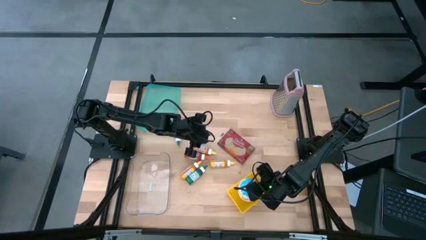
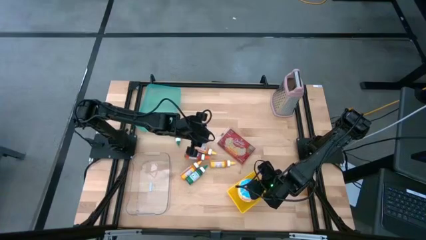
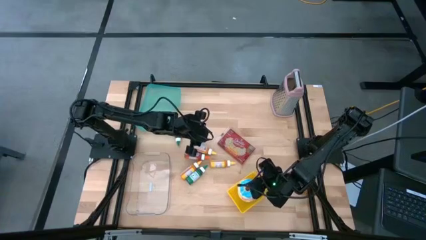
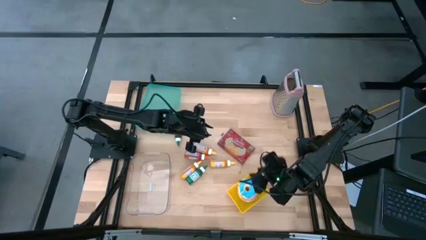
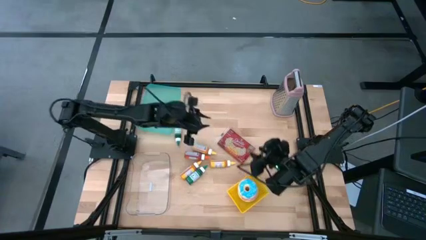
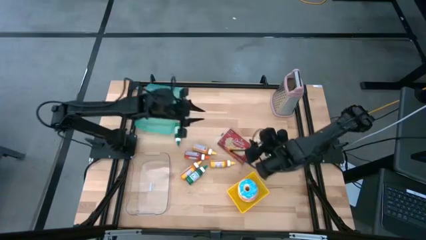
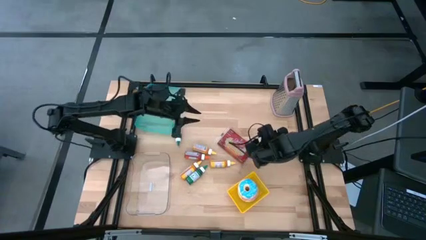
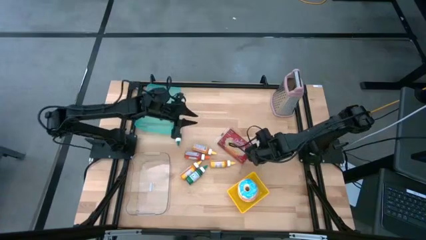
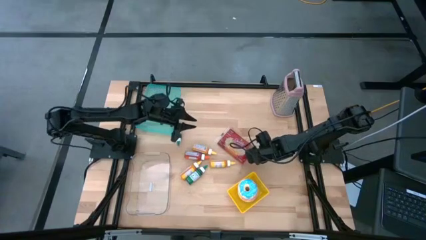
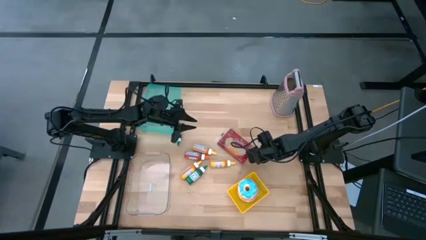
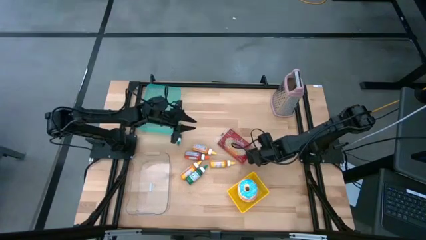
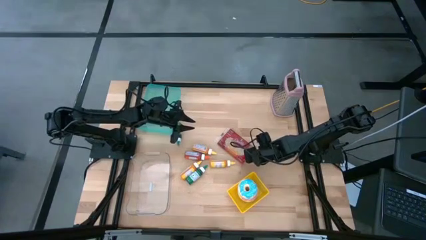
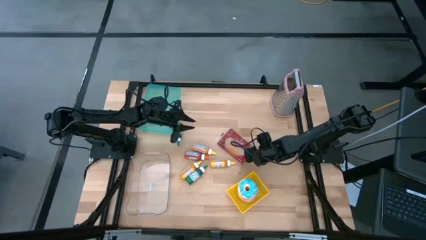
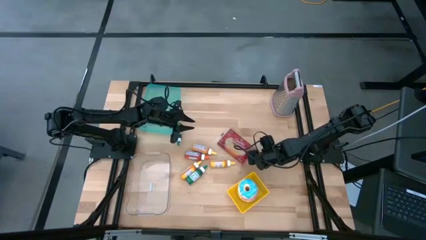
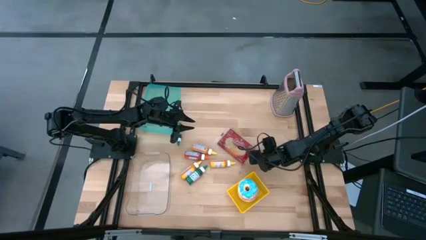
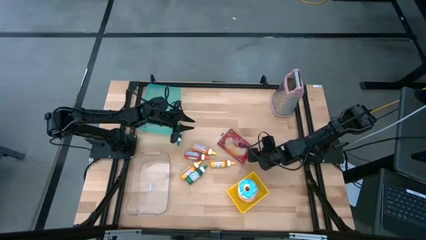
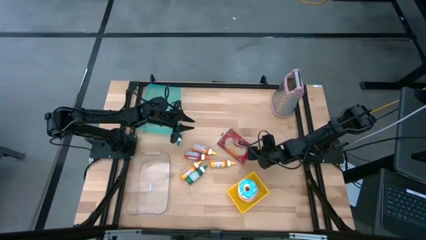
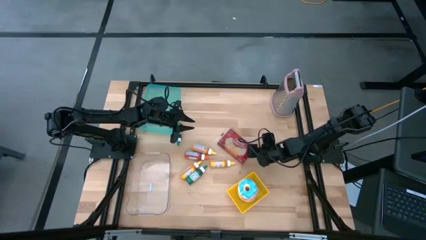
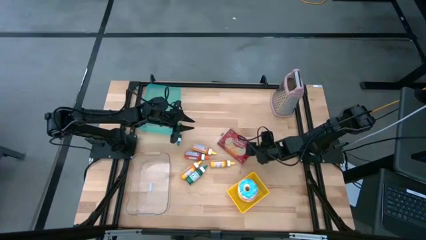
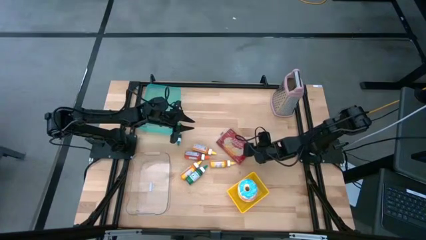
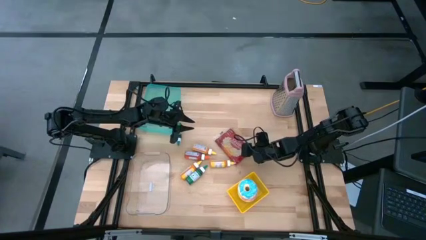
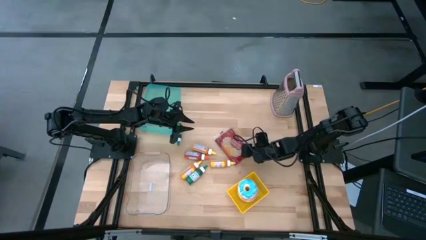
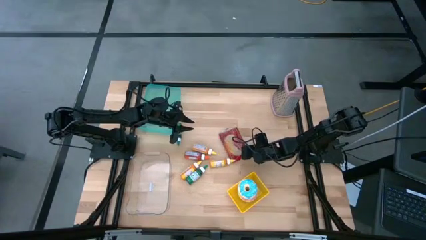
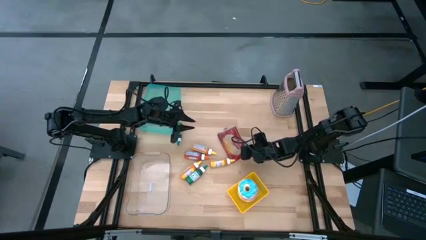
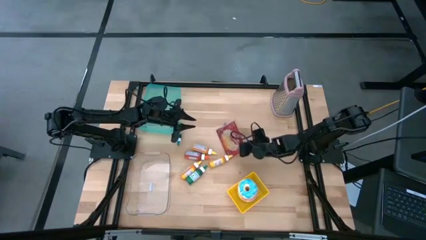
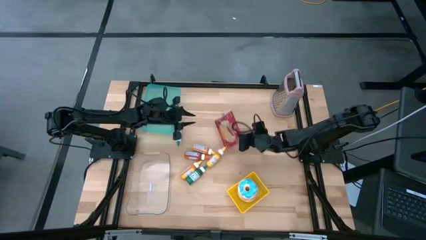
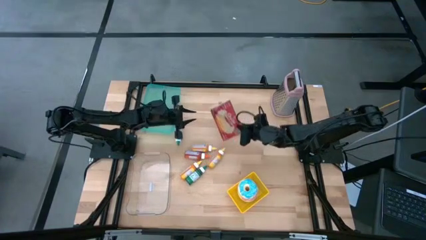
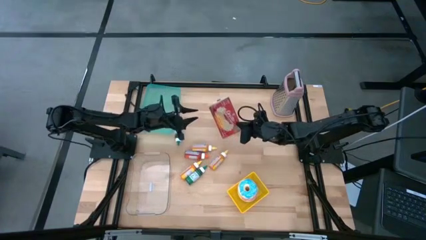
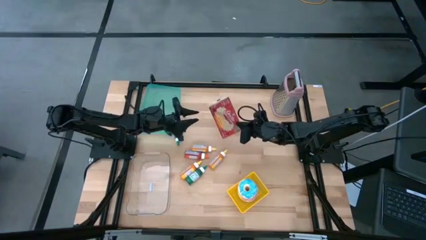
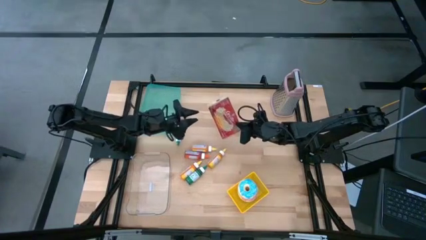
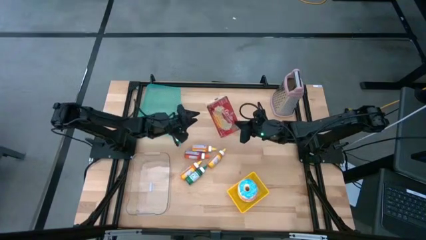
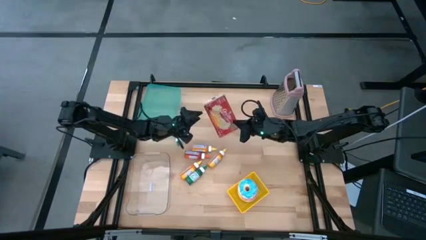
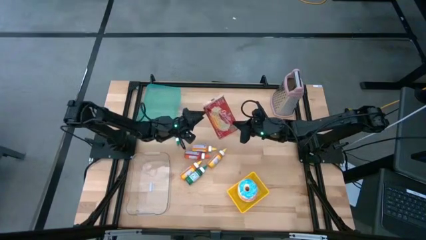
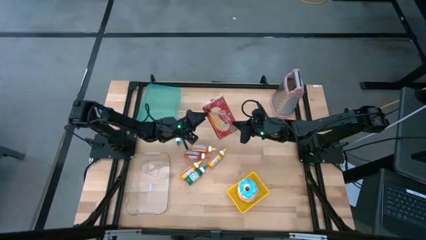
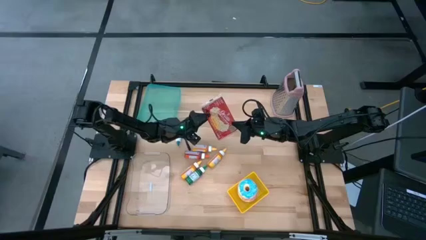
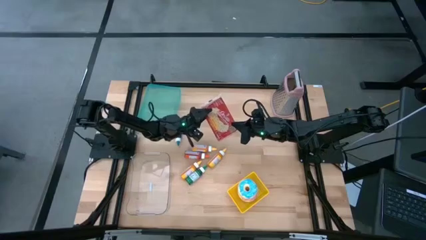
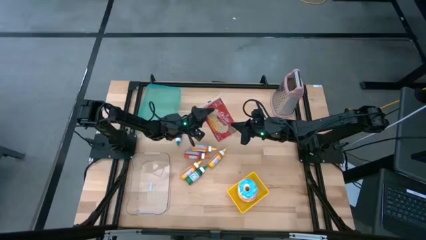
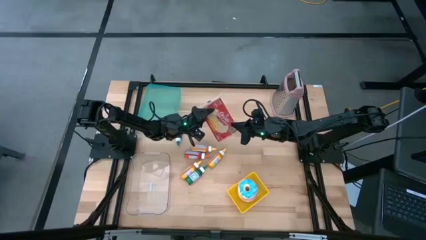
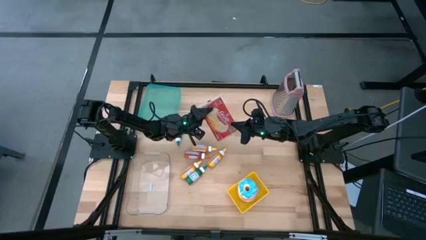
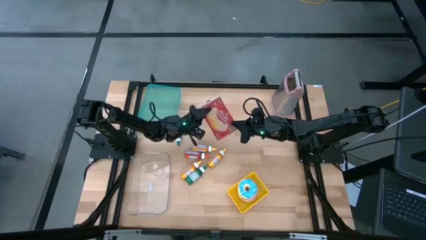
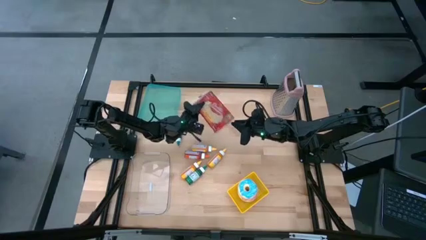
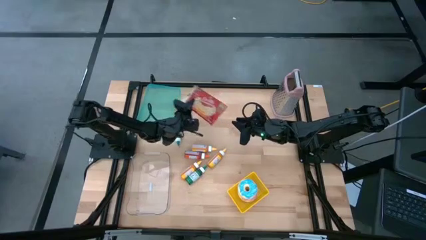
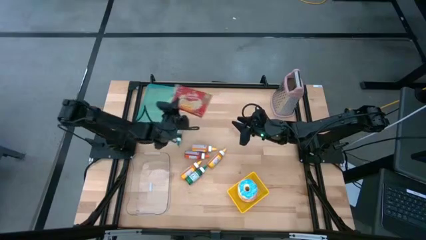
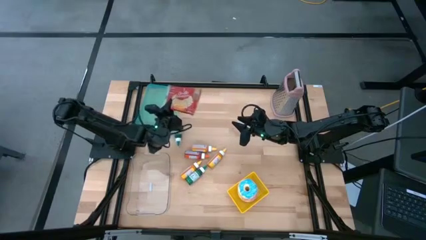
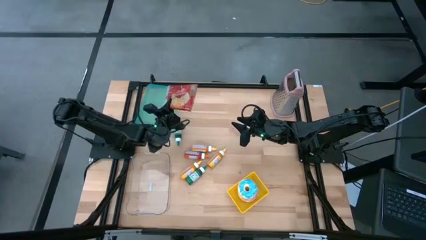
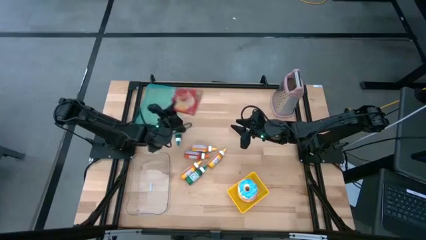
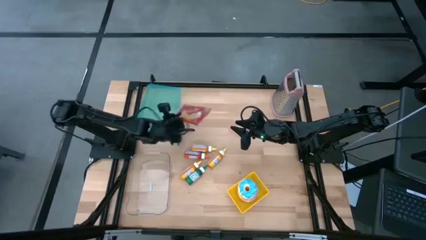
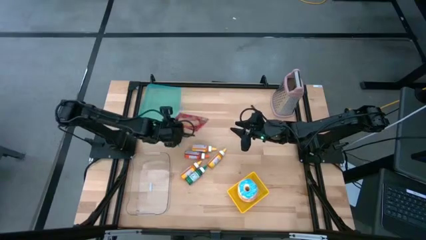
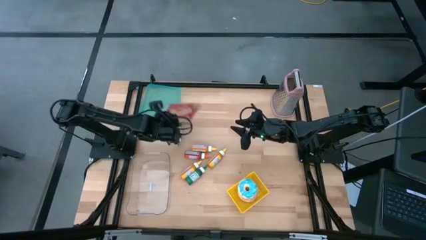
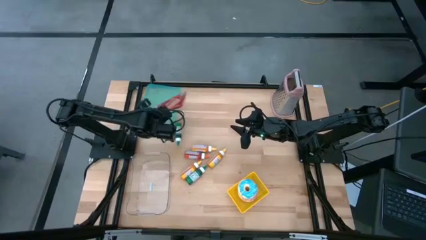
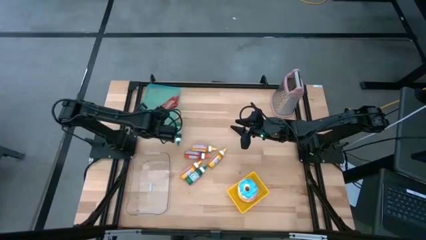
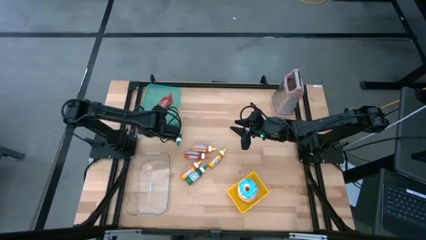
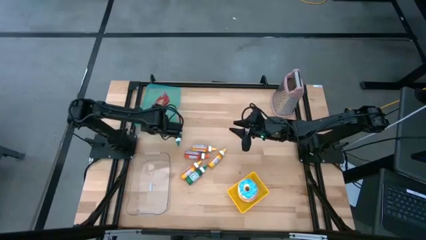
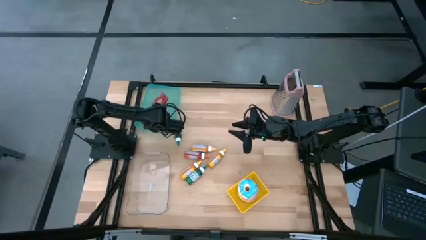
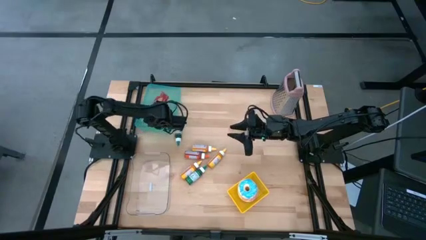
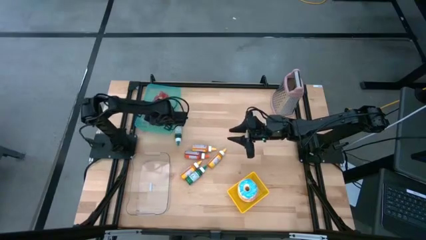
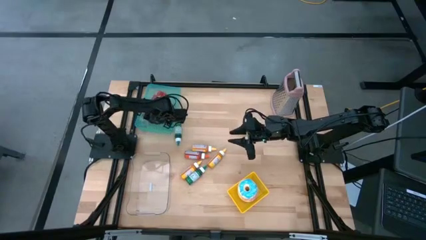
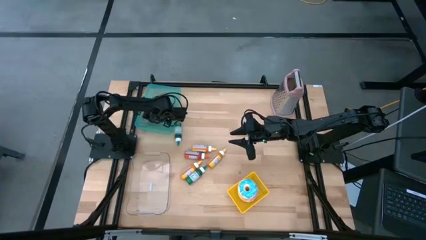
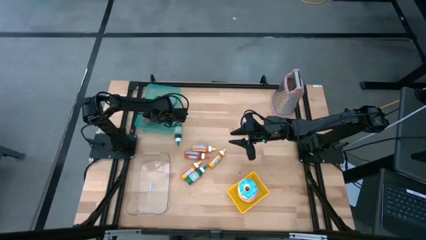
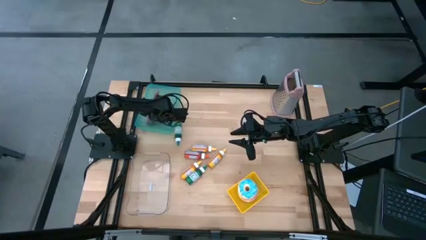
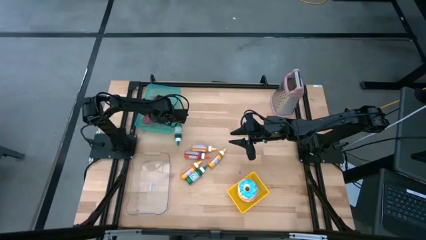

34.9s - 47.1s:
Put the red popcorn bag into the blue bin

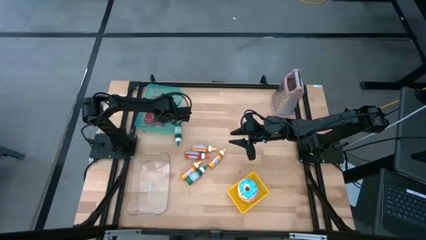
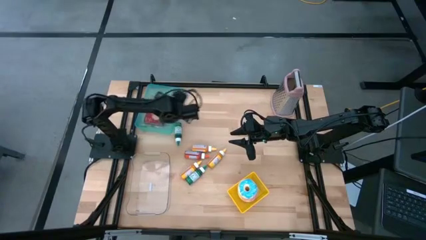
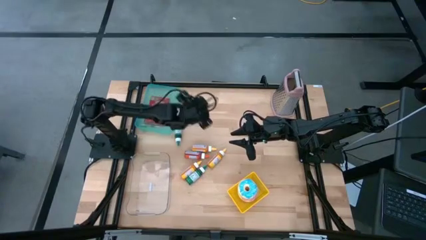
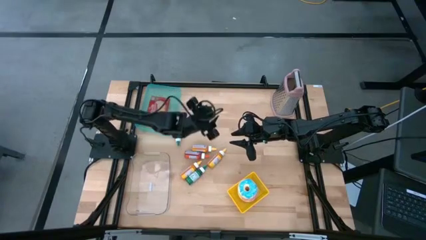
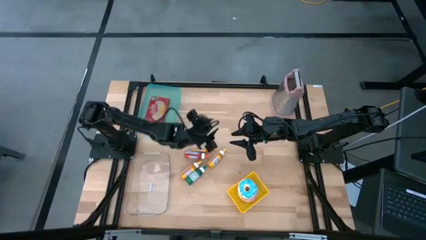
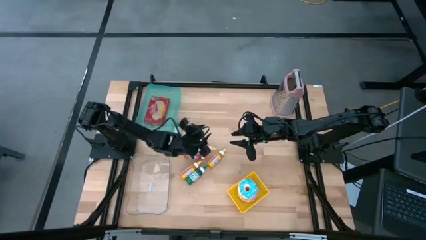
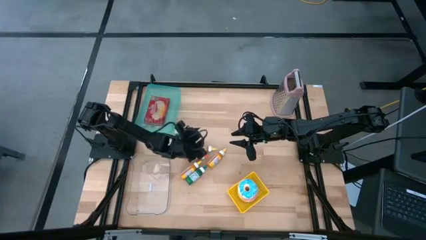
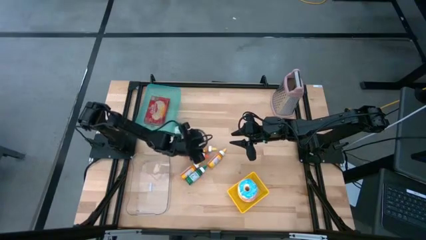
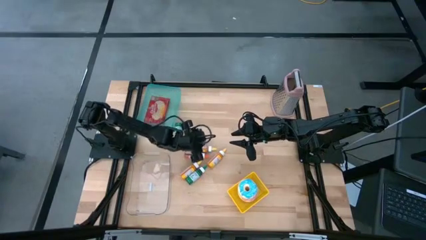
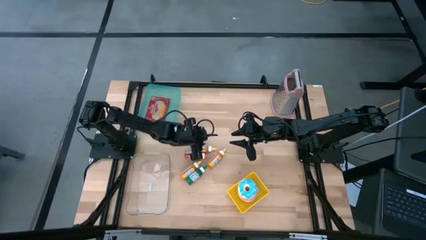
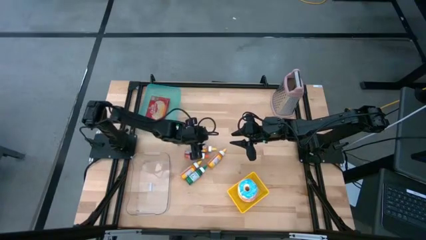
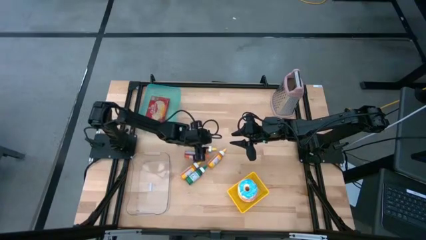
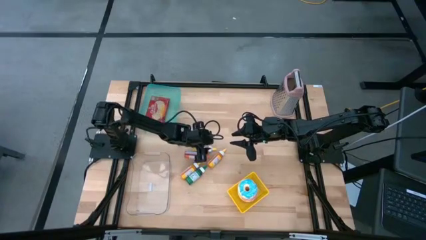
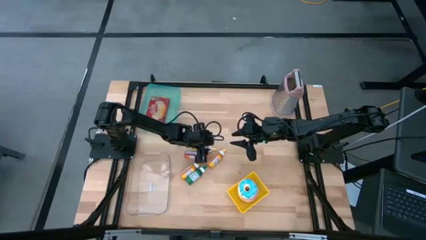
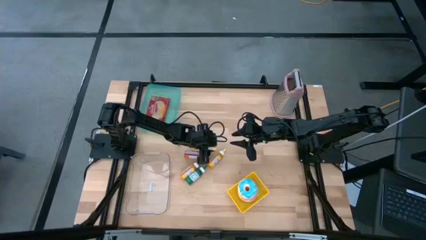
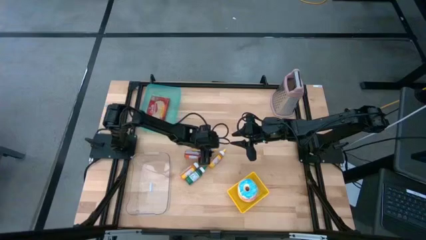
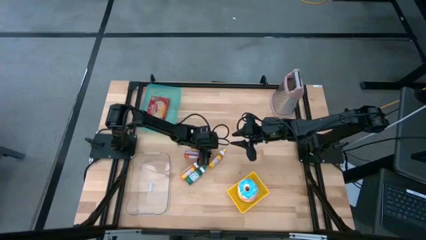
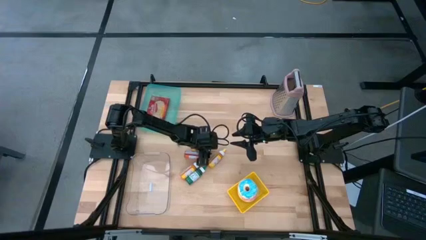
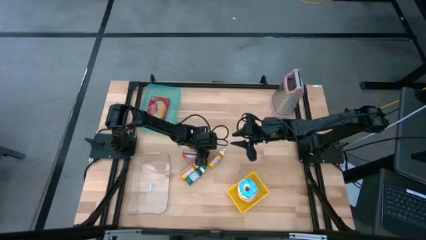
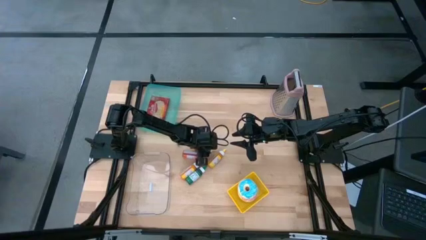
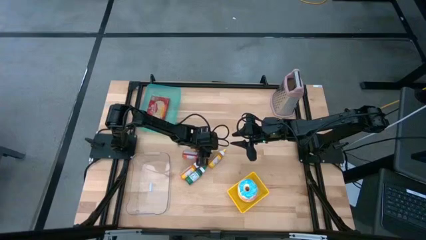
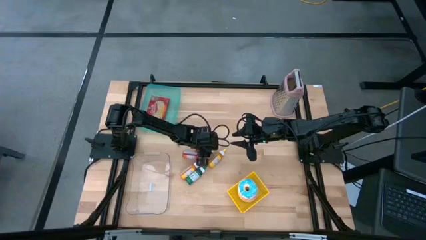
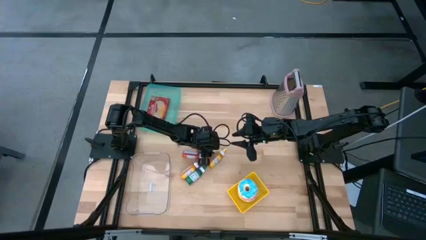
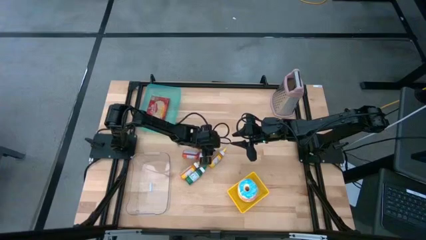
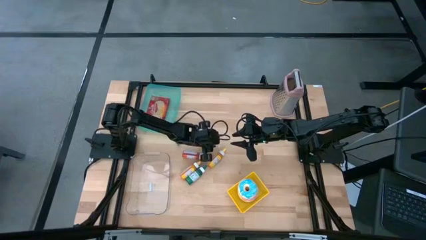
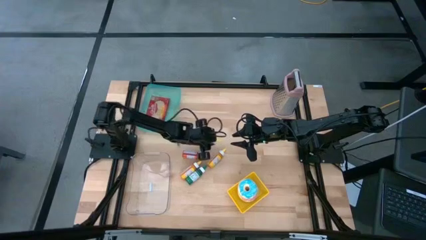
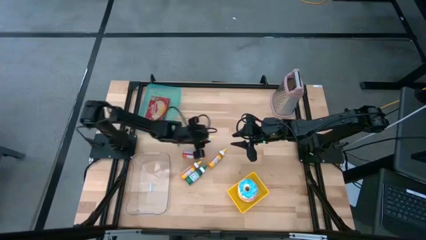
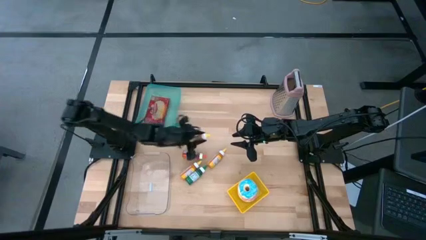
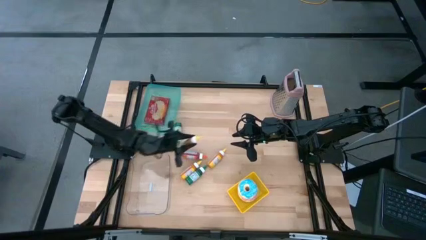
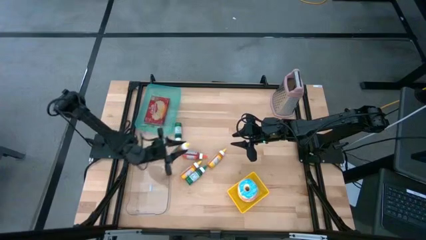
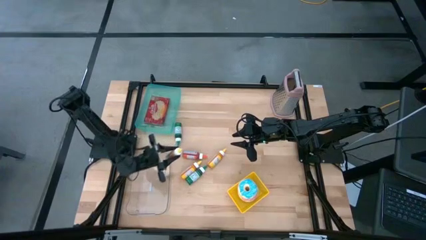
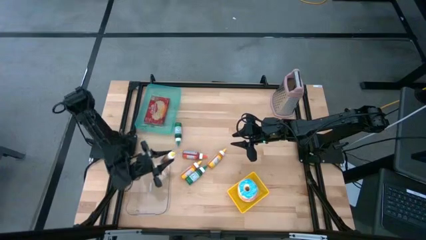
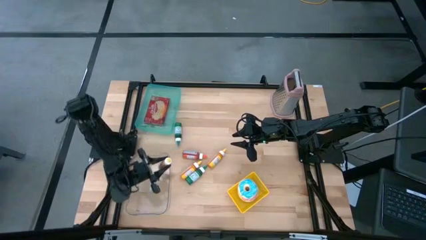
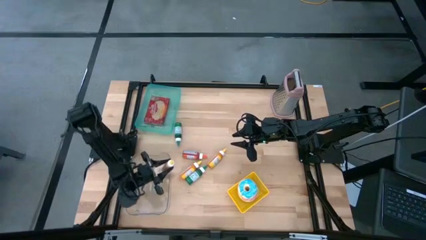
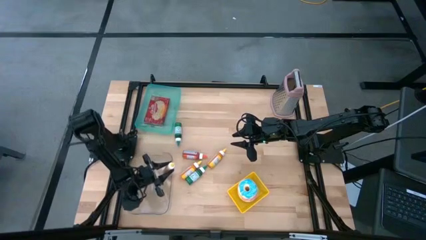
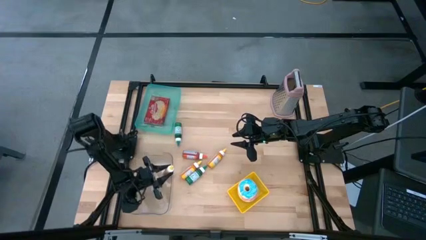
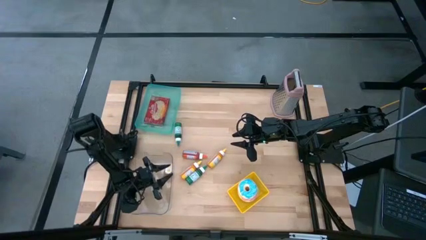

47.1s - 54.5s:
Put the top yellow food coloring bottle into the transparent bin
